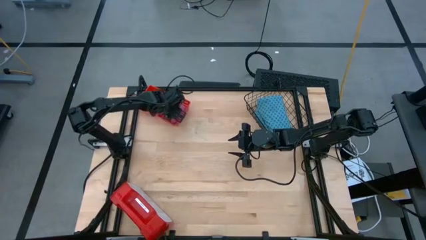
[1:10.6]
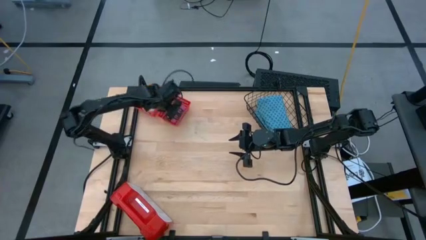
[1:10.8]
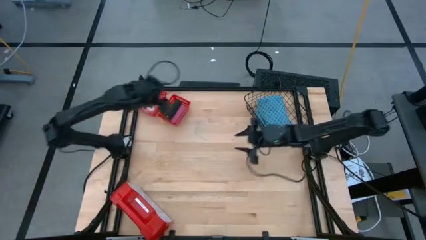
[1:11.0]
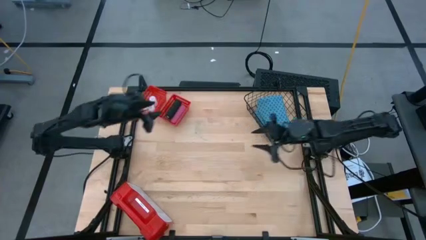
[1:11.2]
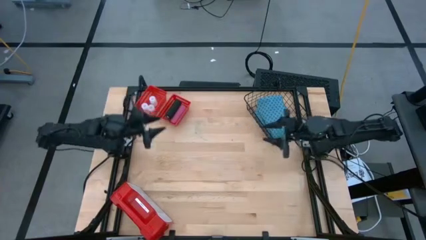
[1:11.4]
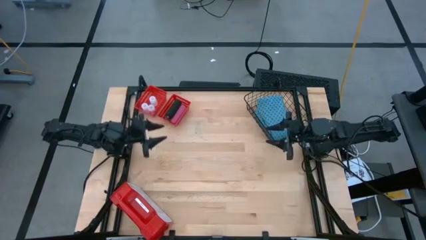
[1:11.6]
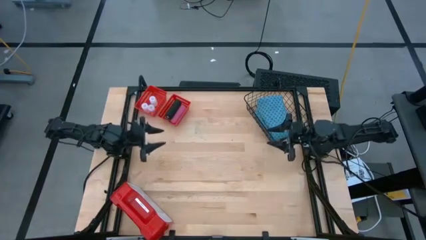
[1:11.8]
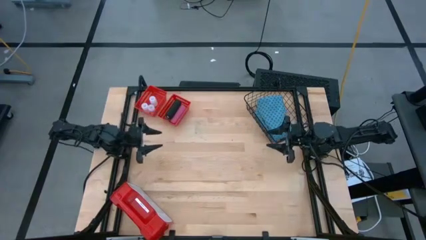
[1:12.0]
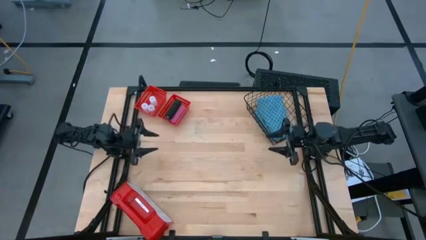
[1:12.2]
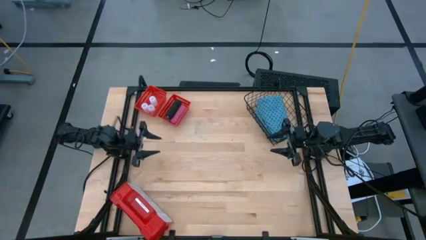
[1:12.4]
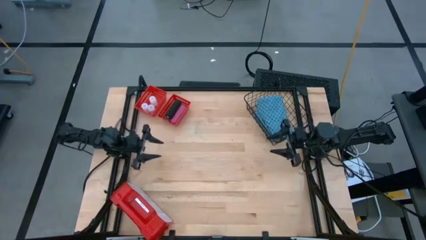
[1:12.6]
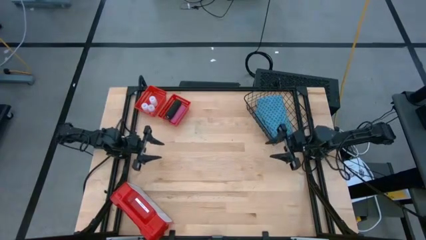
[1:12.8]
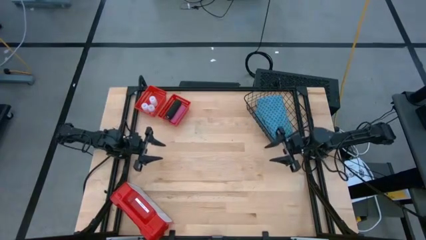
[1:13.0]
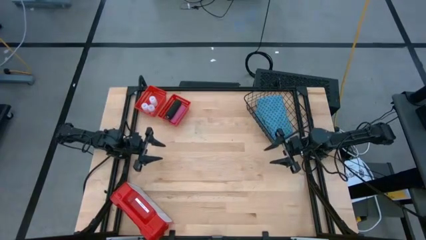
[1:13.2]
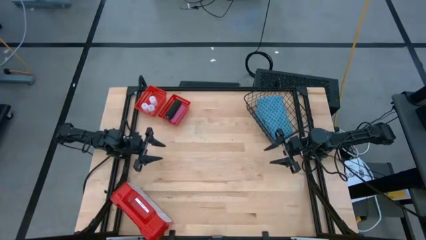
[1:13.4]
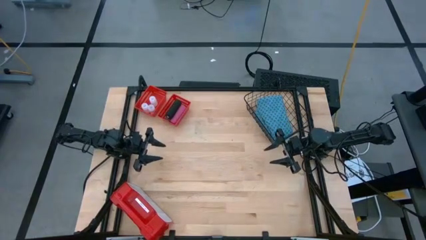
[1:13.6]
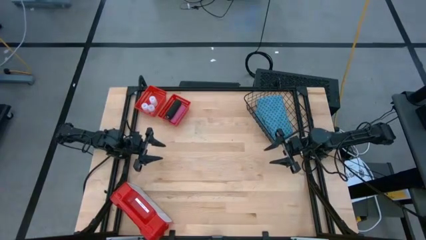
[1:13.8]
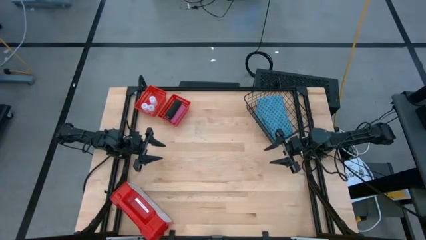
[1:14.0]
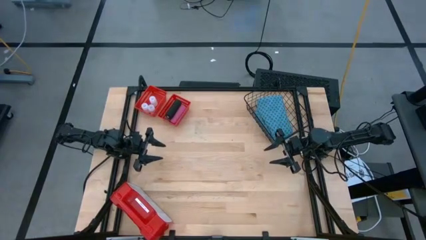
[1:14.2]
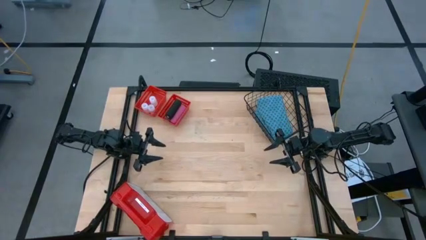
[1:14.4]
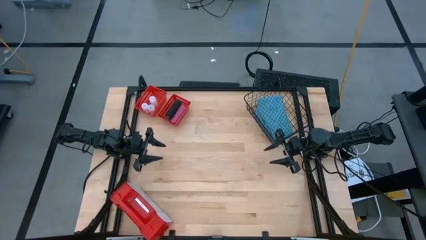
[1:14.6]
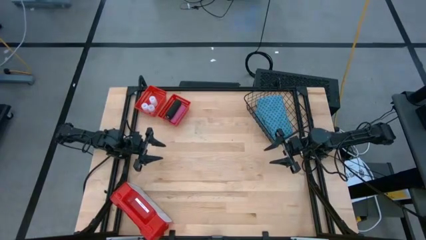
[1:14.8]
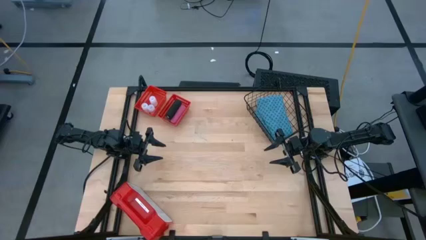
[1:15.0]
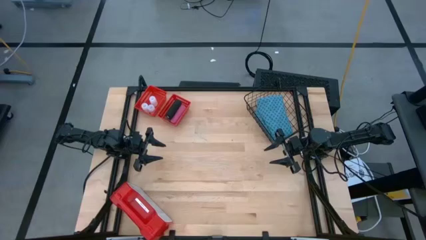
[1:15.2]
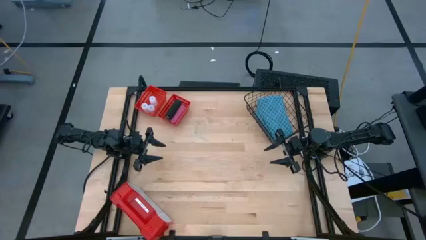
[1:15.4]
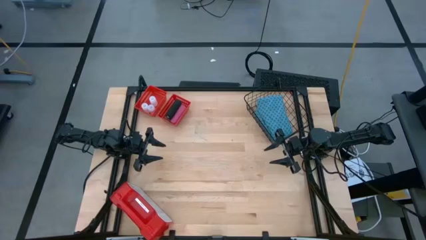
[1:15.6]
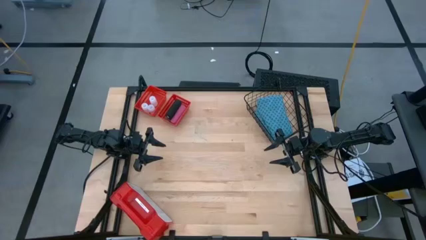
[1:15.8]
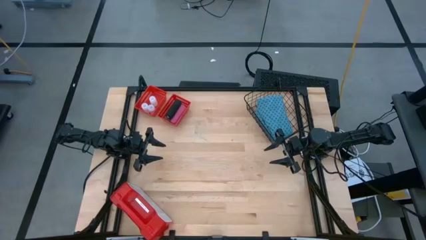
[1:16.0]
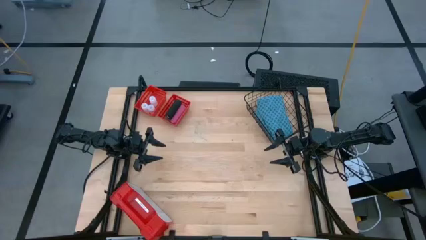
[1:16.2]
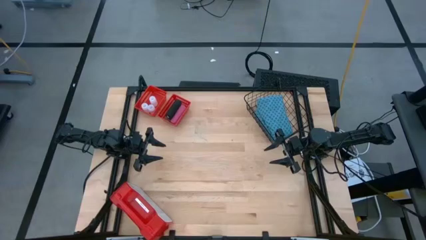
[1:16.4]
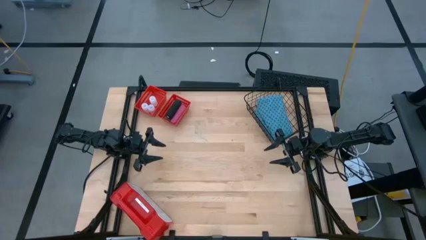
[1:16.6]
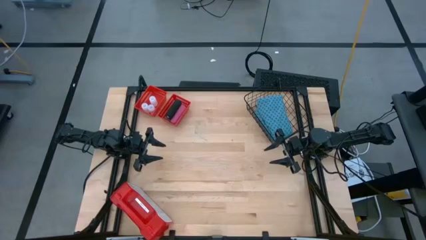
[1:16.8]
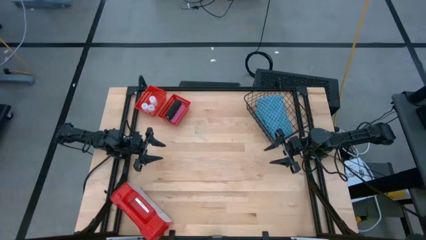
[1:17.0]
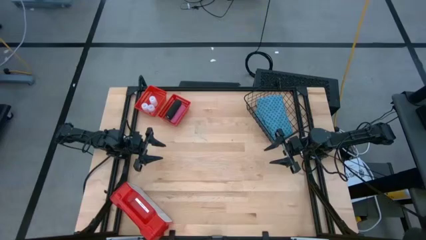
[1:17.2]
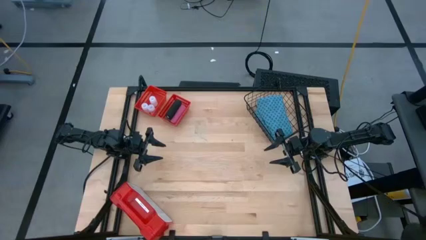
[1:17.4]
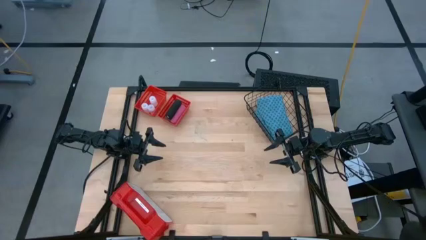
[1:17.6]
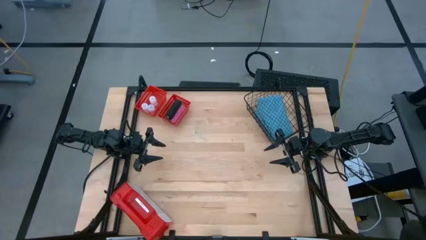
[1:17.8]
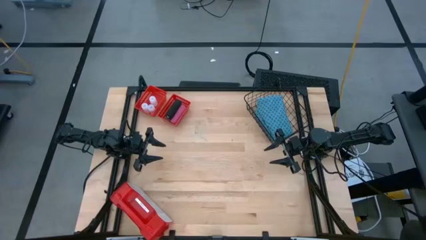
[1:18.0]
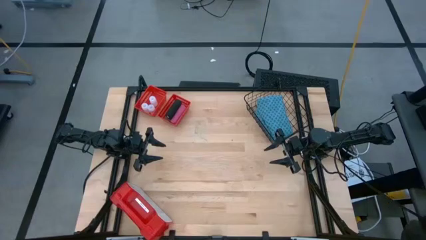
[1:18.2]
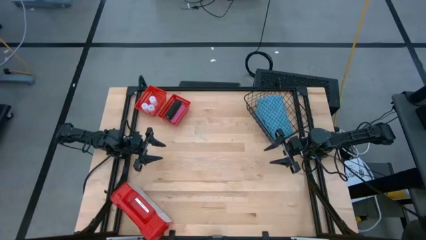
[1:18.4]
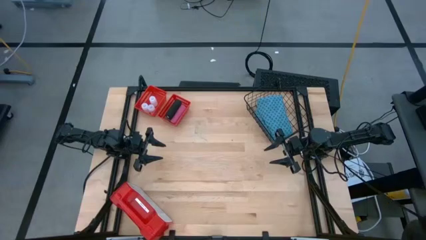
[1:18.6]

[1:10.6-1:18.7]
Task: Pick & place medical supplies in basket/bin
Return to Home Position

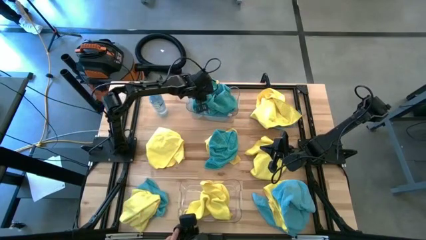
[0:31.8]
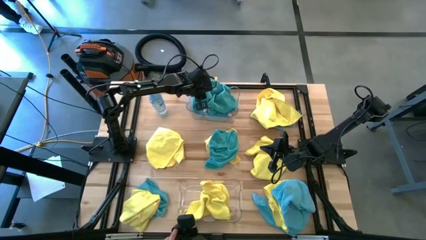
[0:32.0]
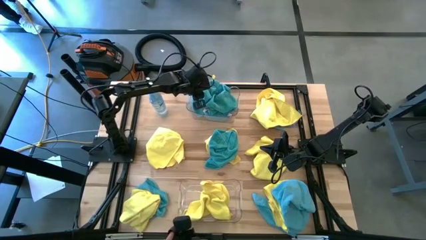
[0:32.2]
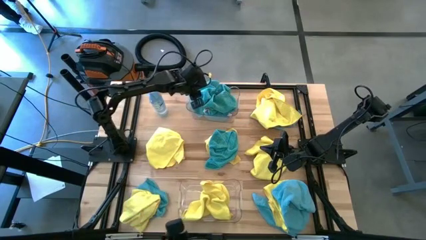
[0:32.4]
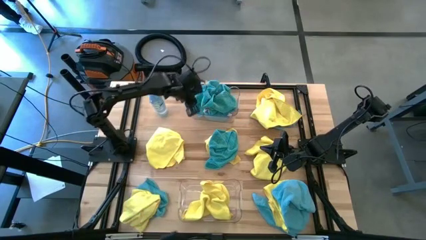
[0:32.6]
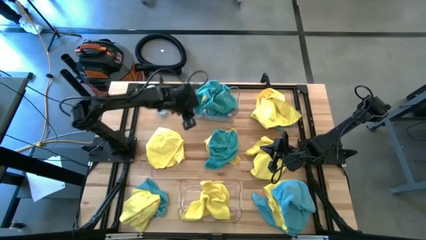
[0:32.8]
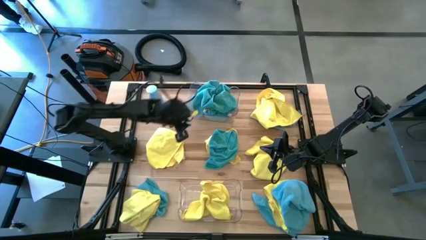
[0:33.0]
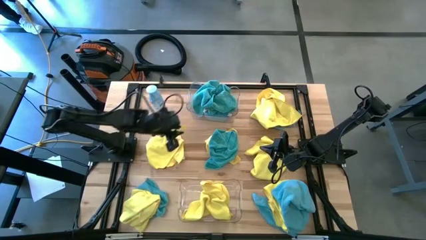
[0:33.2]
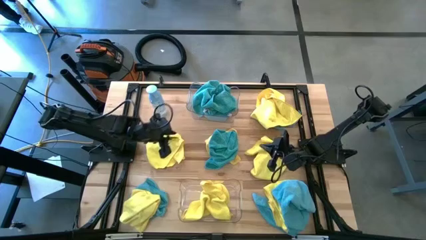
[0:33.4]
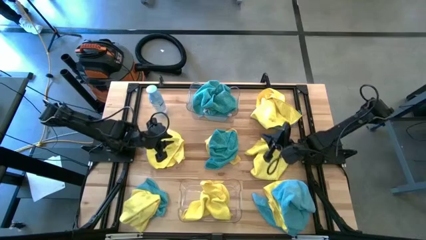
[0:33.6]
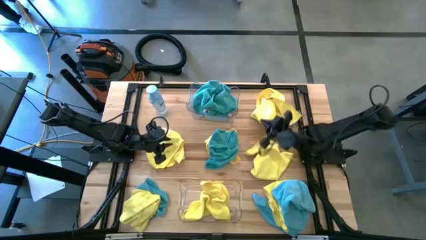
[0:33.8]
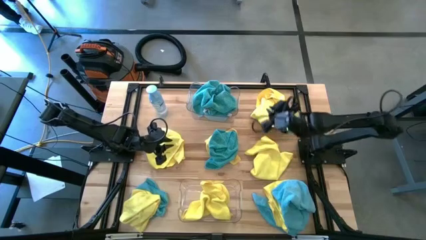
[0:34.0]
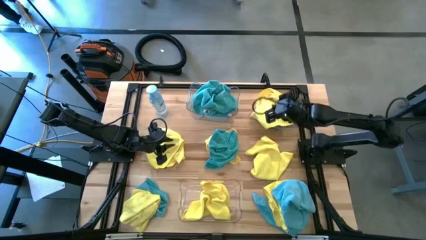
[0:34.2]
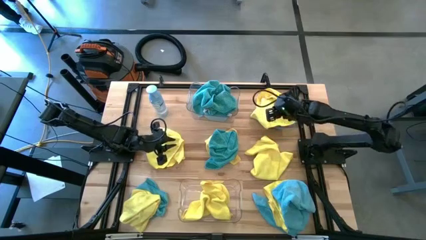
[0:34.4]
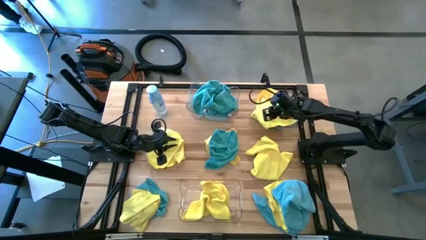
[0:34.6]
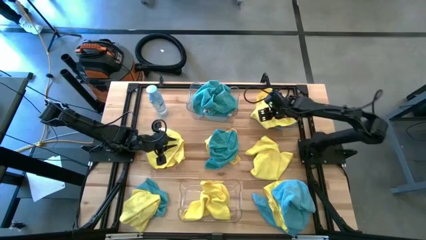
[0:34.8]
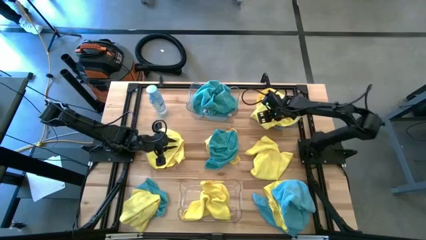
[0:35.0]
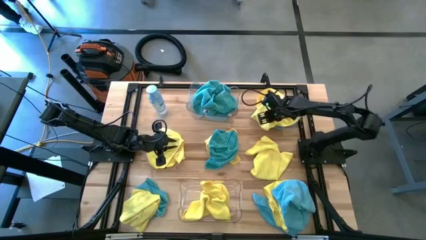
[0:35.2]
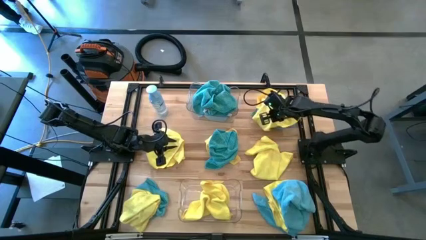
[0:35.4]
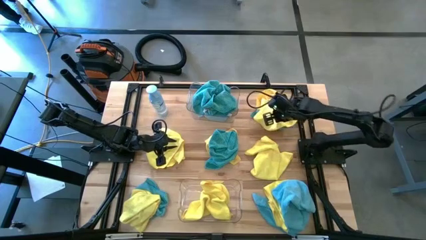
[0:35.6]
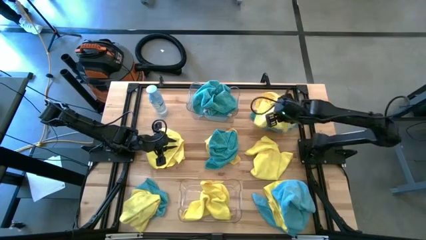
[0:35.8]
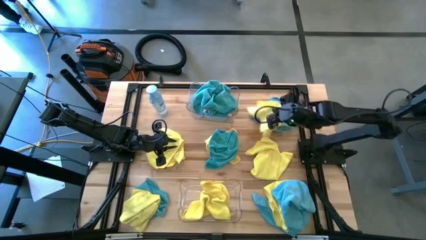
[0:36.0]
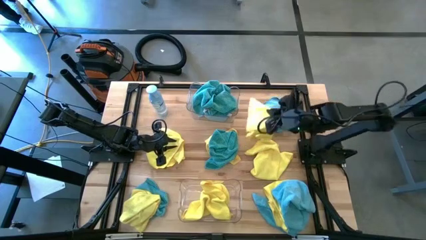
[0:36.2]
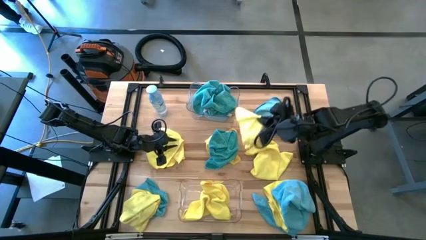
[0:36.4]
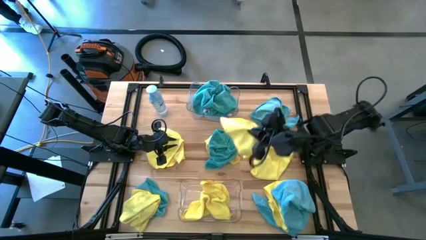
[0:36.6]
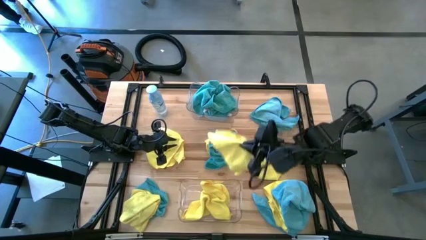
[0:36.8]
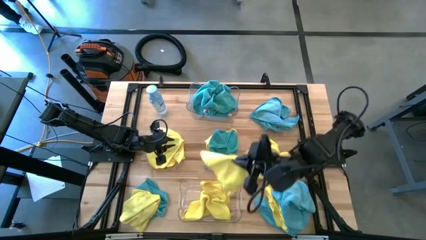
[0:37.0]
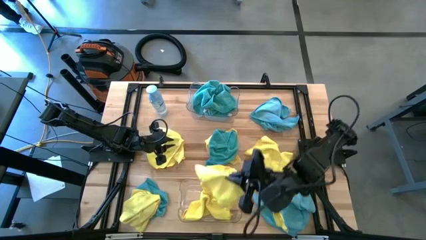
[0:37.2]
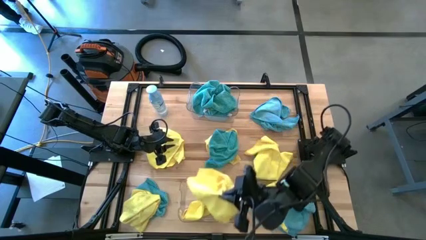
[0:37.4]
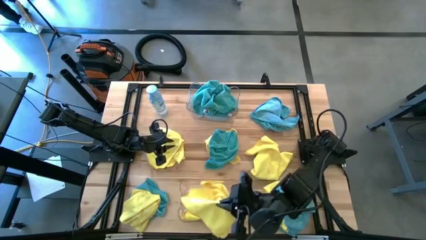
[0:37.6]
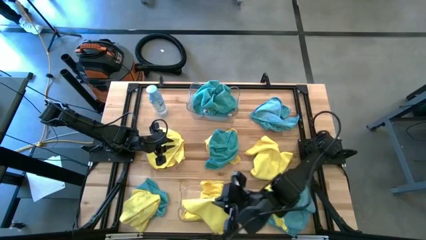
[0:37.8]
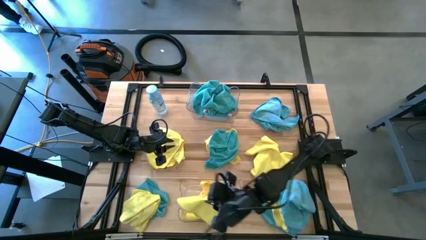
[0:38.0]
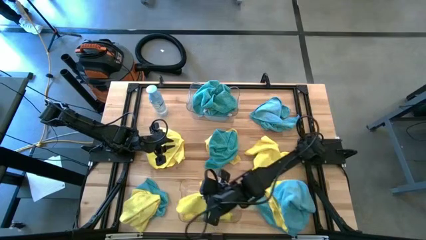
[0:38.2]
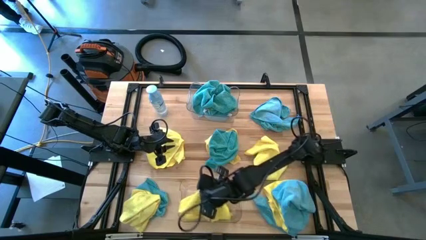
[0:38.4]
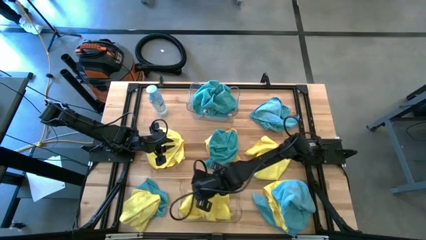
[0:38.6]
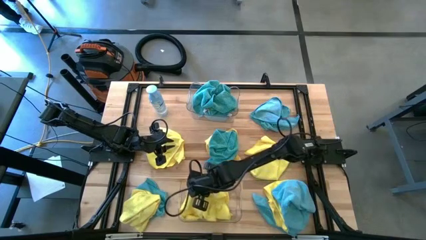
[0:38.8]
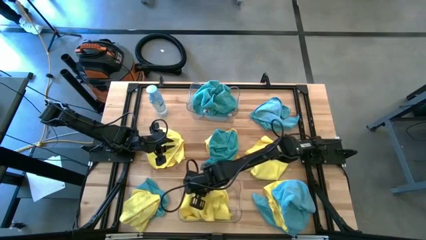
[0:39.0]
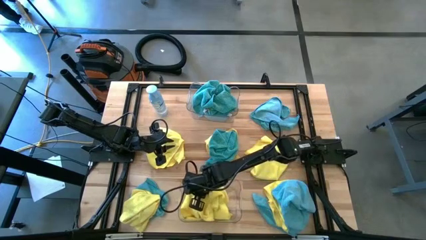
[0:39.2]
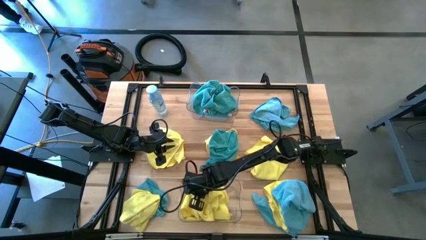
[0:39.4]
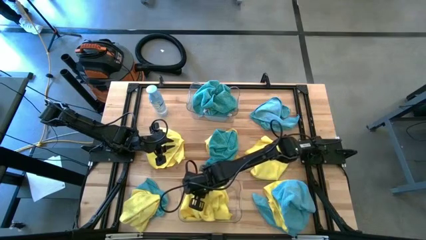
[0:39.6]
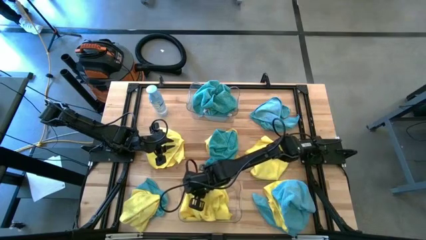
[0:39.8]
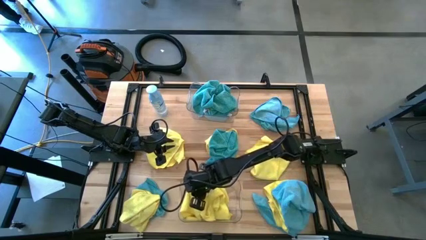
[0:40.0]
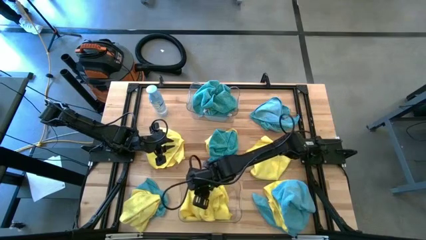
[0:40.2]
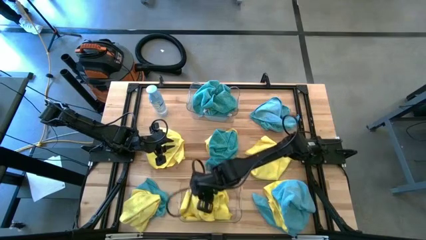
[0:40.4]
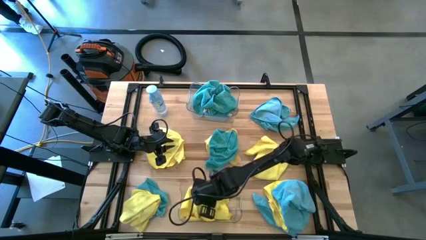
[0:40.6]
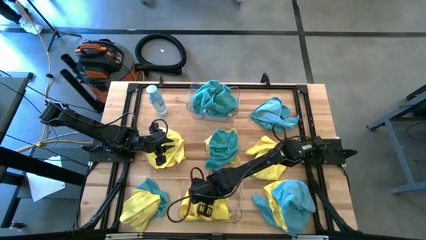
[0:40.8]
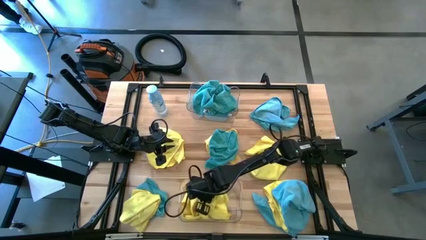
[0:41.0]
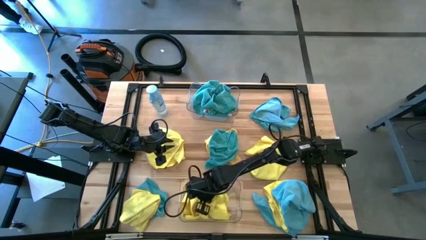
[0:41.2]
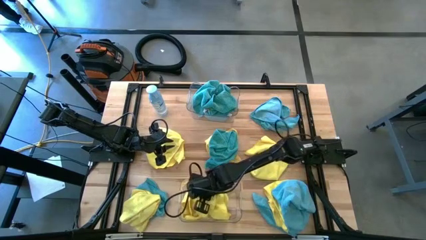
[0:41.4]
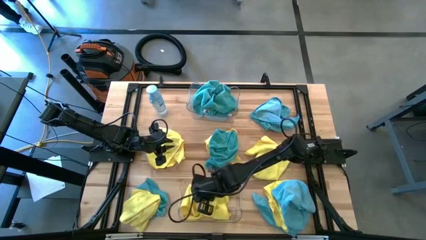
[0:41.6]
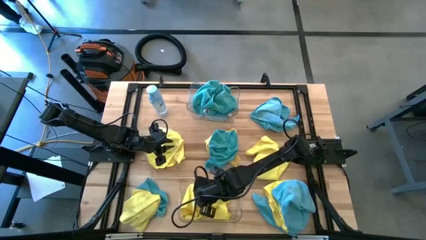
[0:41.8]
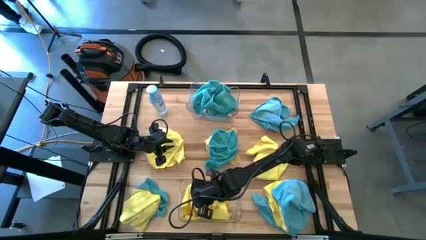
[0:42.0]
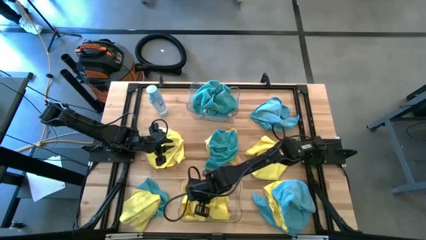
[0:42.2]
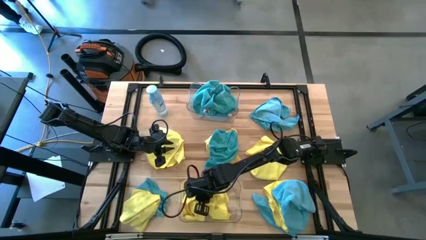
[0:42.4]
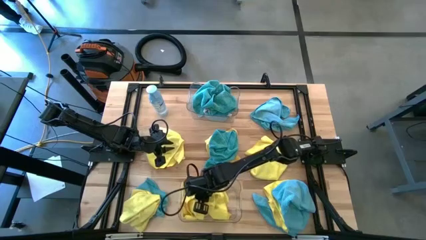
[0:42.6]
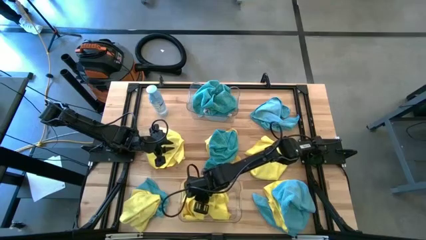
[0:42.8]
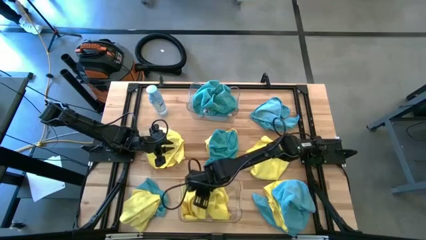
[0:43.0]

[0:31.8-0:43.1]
Task: Sort microfiber towel by color & place in baskets
Put the yellow towel into the bottom transparent bin
